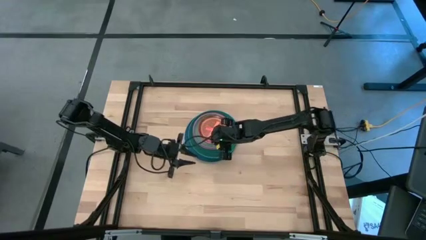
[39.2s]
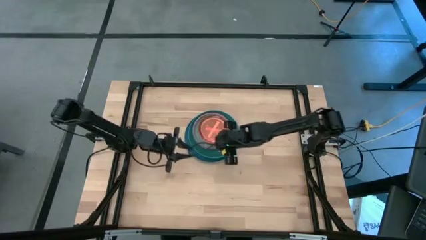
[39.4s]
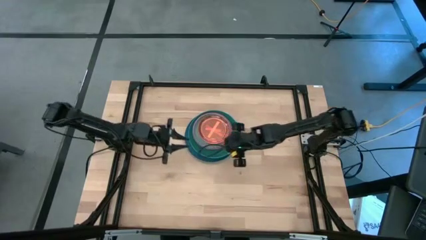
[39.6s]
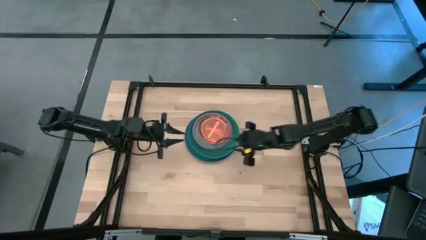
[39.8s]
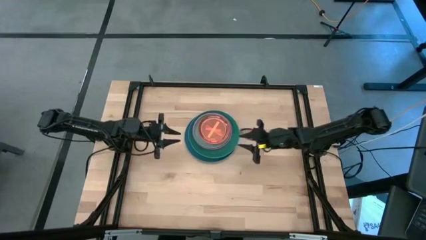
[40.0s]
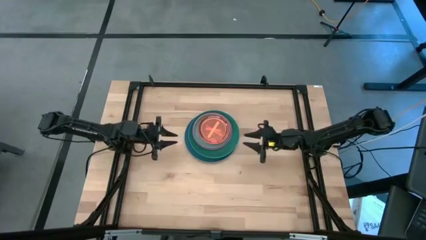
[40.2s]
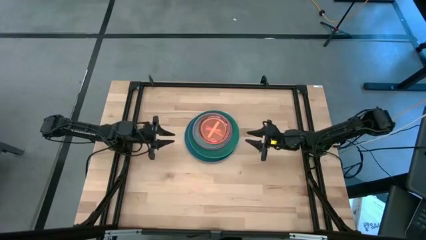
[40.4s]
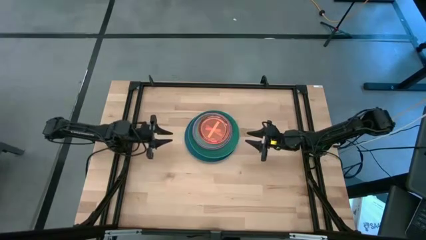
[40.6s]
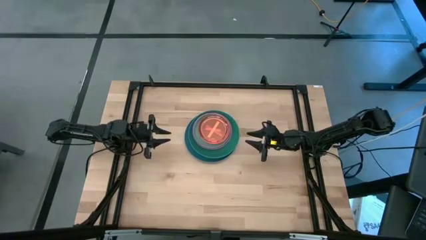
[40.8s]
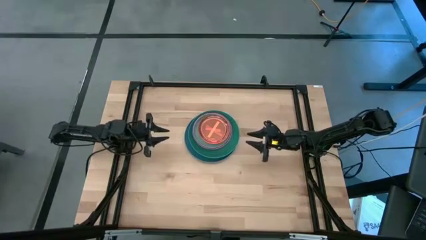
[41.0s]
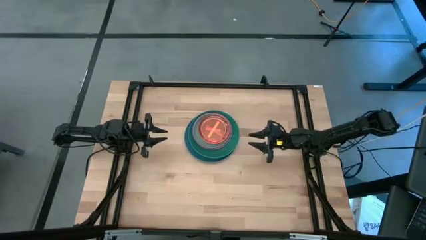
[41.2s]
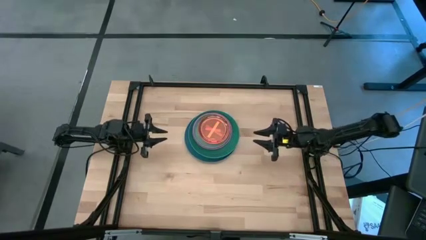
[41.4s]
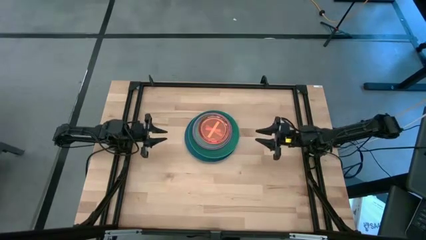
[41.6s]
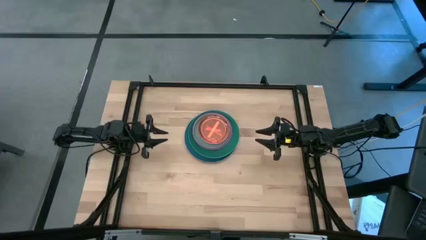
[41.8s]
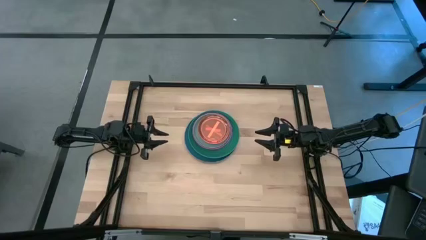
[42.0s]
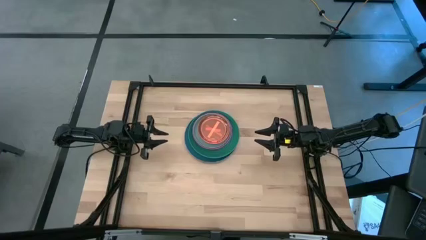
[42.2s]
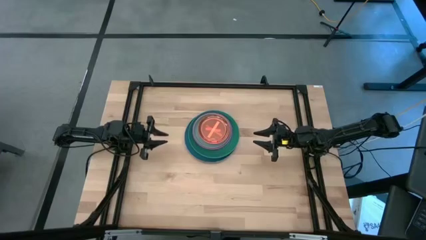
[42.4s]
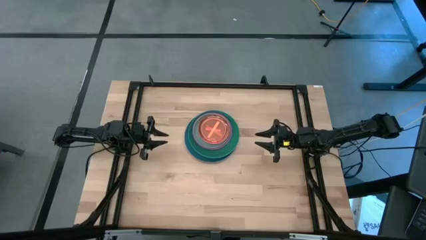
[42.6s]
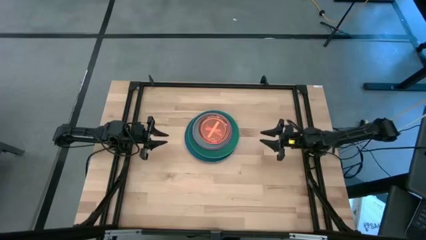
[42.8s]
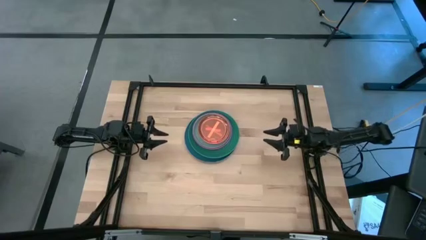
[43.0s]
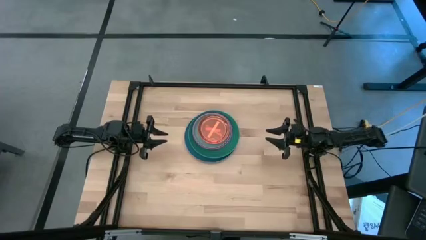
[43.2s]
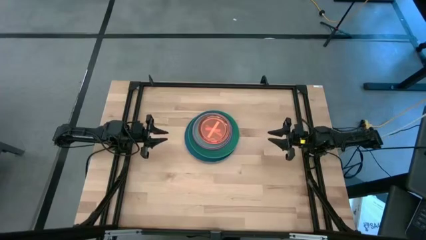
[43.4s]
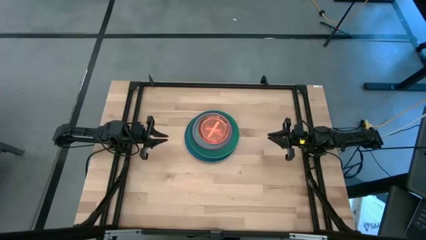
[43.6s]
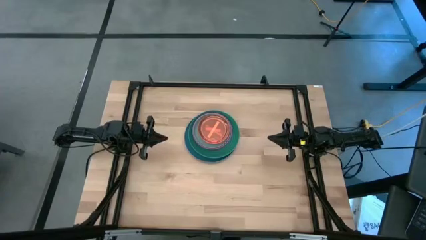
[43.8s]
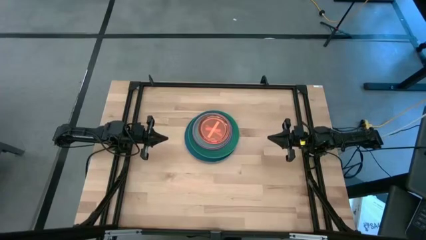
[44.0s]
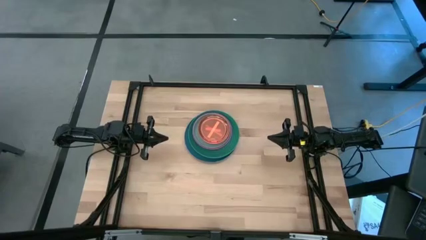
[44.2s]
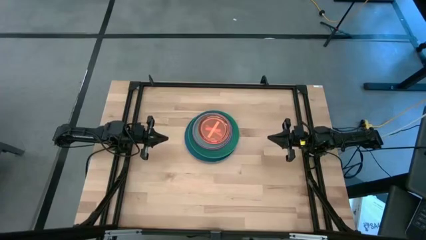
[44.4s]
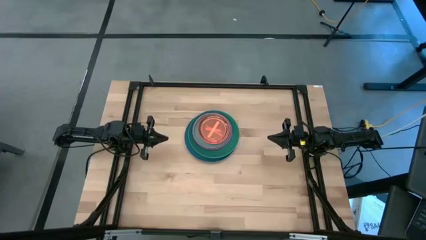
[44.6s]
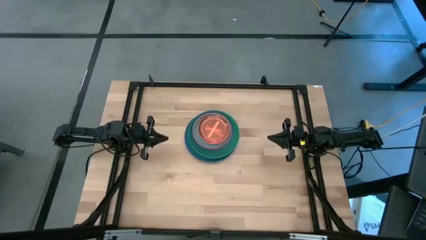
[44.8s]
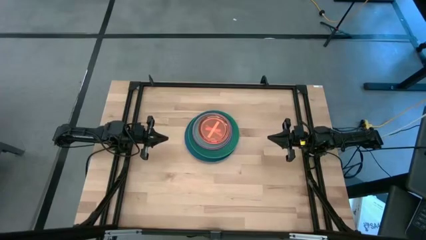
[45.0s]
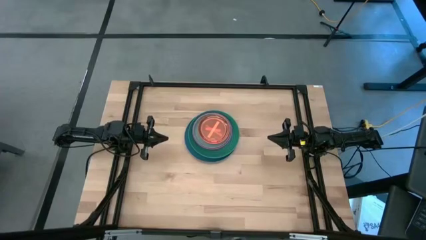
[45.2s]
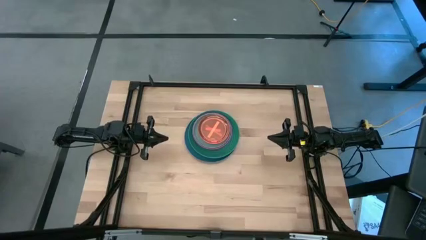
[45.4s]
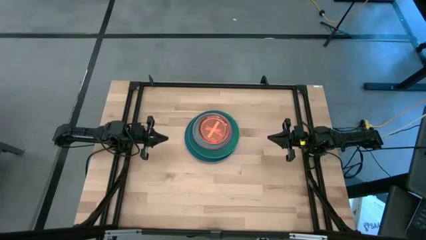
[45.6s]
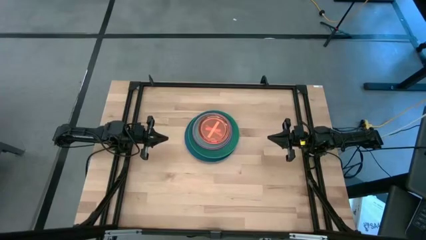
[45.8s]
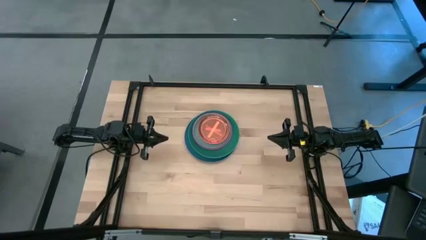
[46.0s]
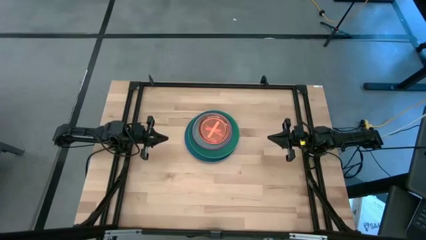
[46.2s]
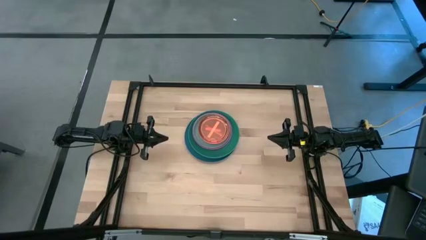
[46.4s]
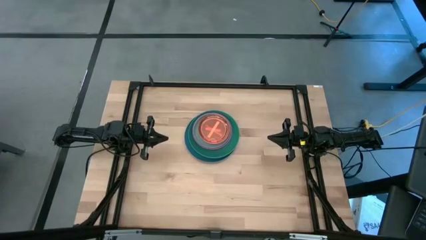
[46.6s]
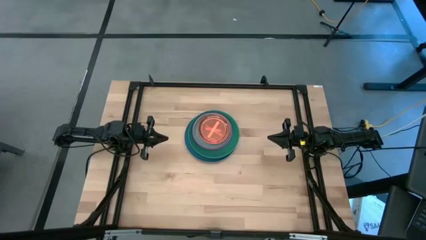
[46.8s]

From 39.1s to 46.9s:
Task: Stack plastic plates
Return to Home Position

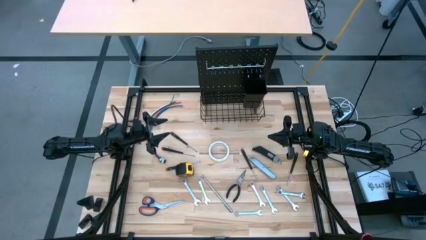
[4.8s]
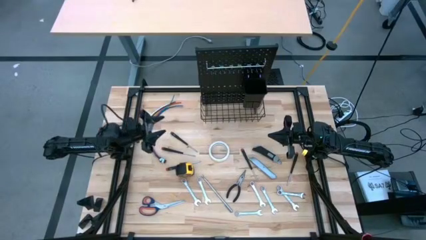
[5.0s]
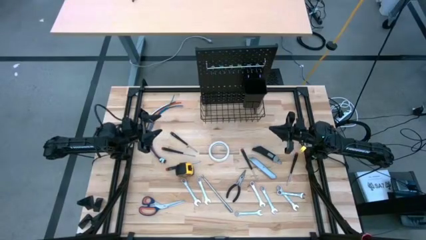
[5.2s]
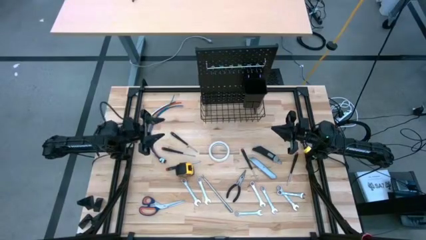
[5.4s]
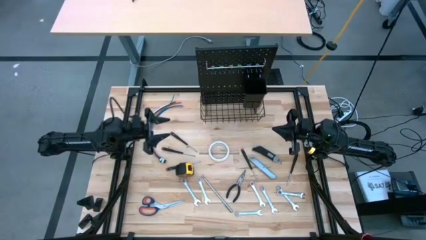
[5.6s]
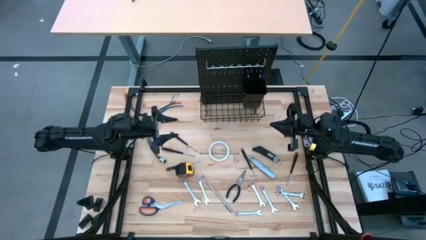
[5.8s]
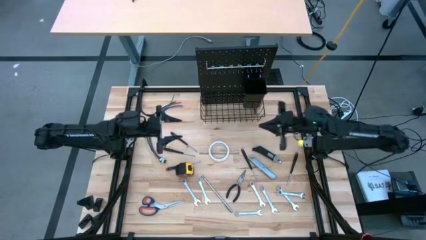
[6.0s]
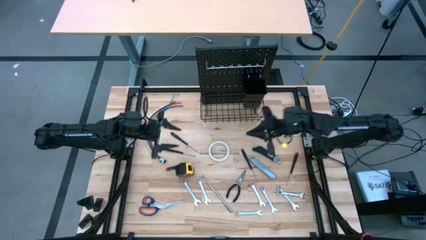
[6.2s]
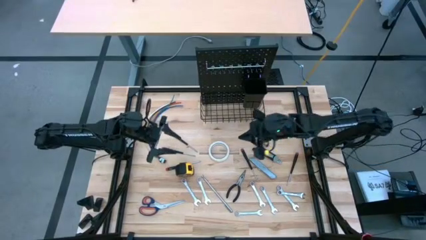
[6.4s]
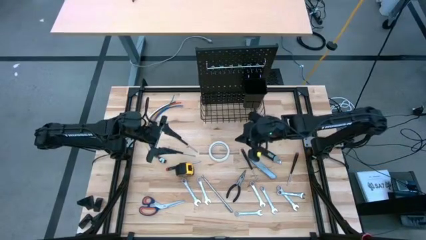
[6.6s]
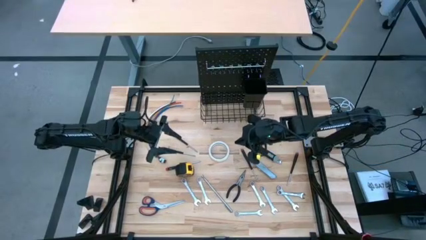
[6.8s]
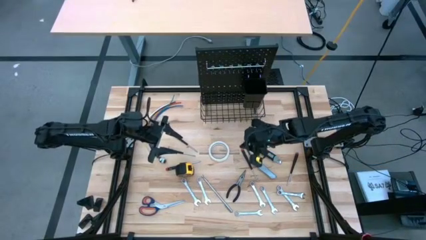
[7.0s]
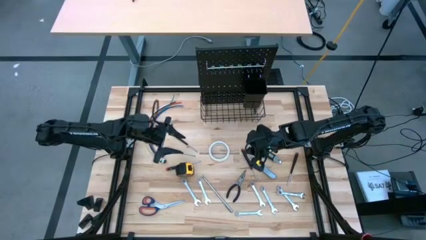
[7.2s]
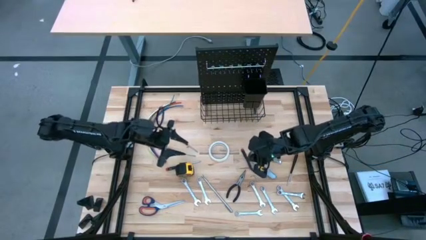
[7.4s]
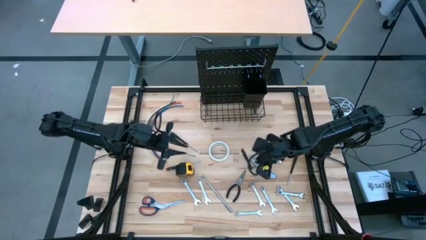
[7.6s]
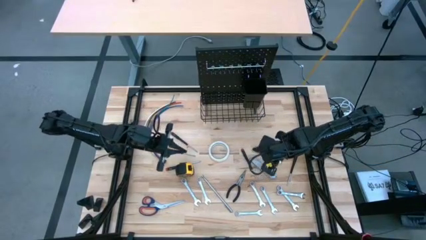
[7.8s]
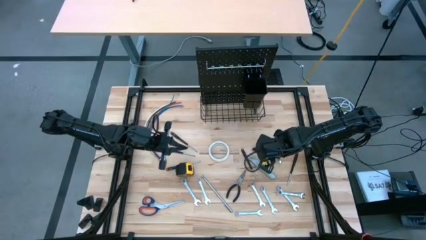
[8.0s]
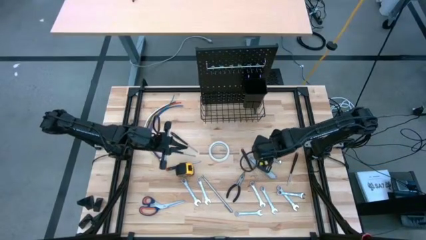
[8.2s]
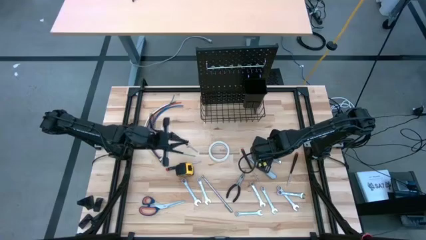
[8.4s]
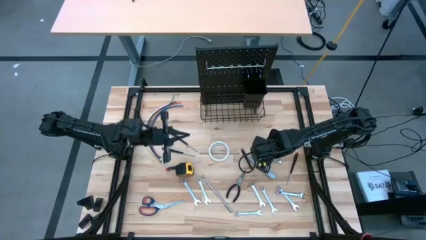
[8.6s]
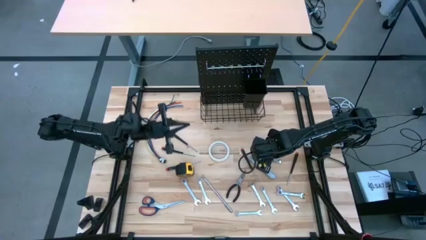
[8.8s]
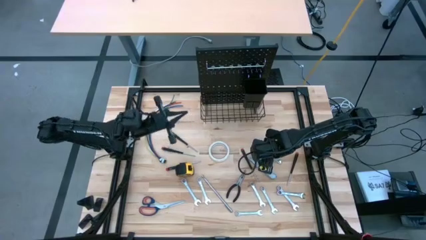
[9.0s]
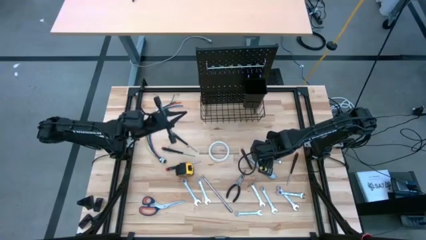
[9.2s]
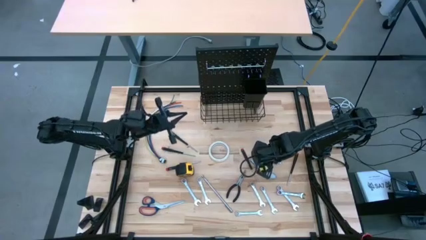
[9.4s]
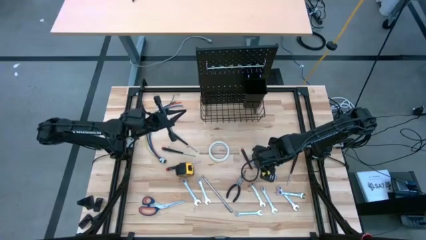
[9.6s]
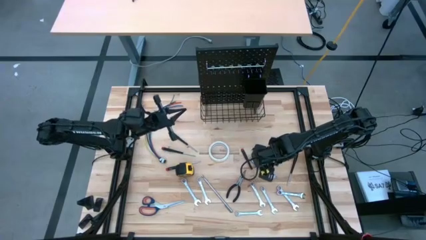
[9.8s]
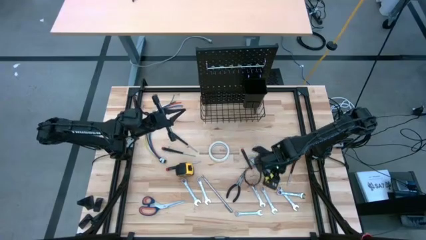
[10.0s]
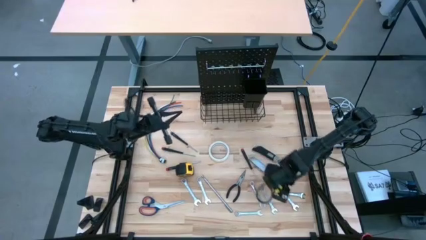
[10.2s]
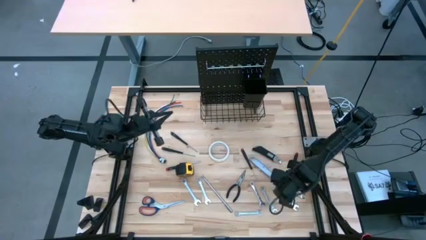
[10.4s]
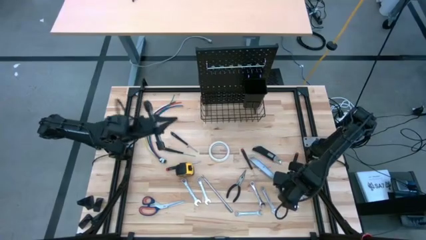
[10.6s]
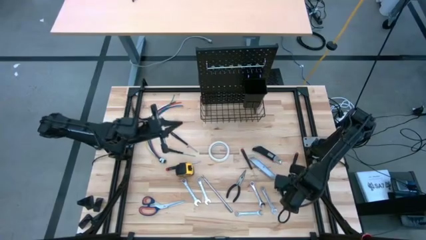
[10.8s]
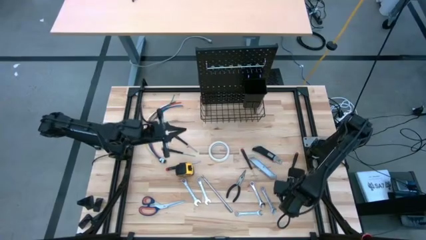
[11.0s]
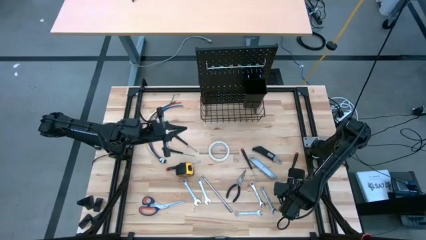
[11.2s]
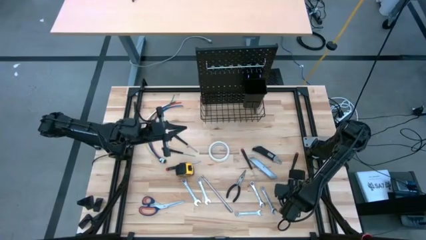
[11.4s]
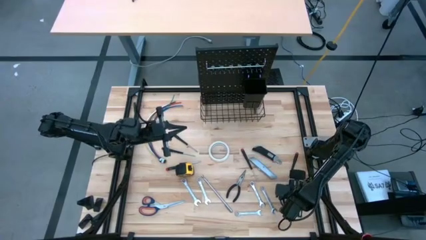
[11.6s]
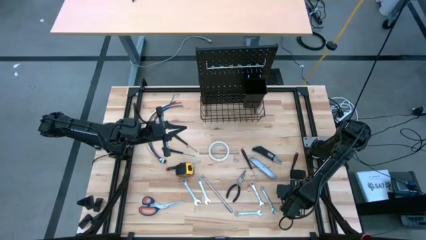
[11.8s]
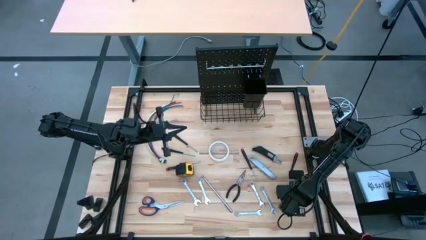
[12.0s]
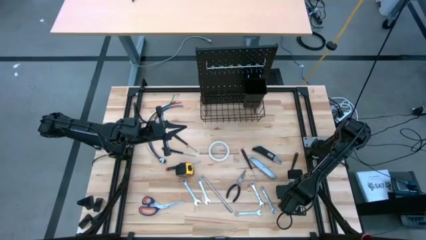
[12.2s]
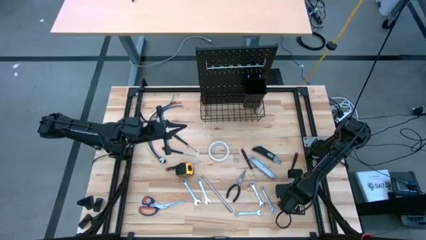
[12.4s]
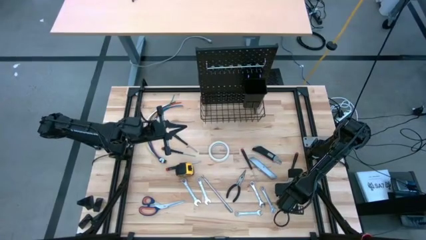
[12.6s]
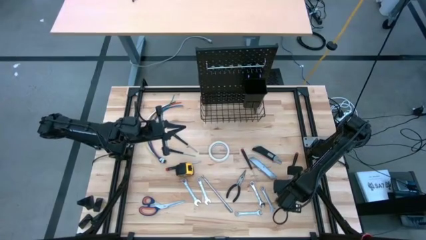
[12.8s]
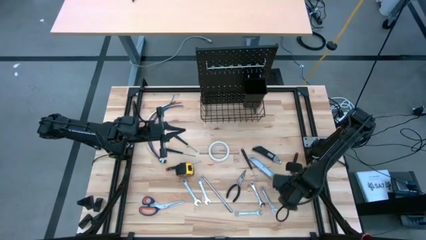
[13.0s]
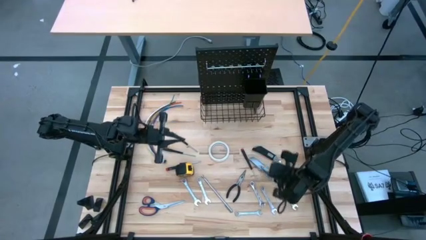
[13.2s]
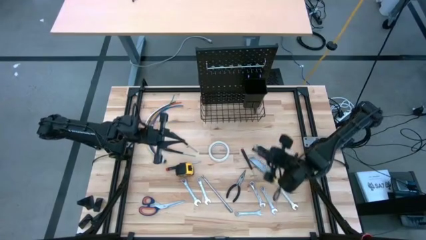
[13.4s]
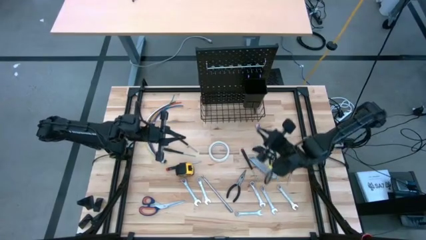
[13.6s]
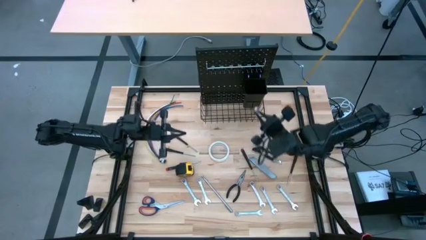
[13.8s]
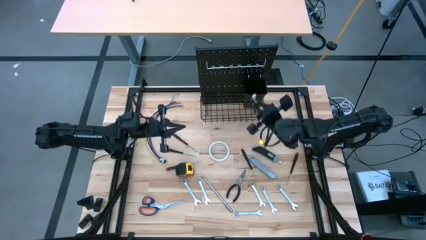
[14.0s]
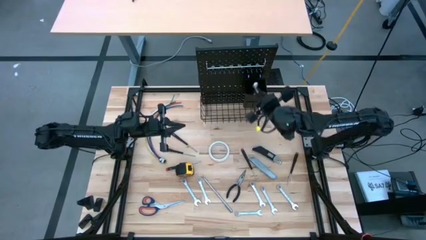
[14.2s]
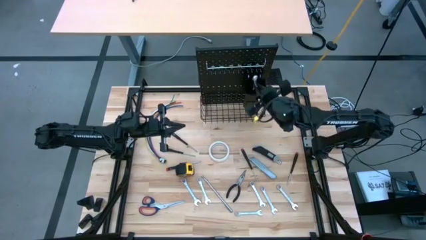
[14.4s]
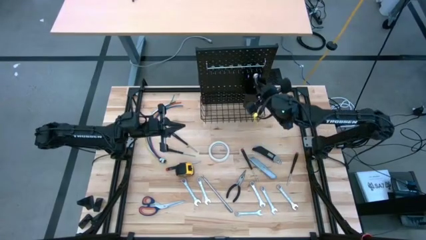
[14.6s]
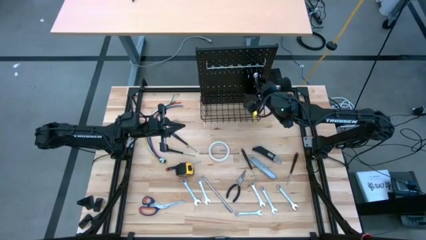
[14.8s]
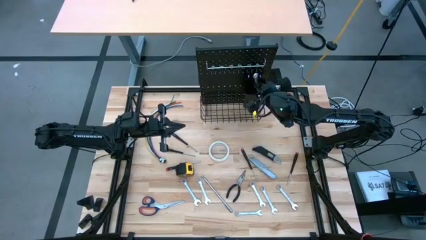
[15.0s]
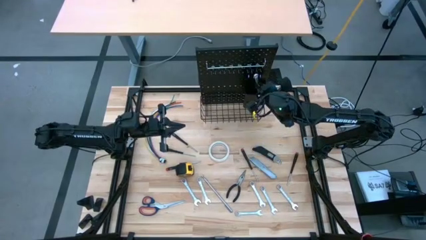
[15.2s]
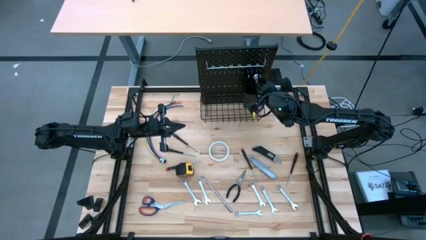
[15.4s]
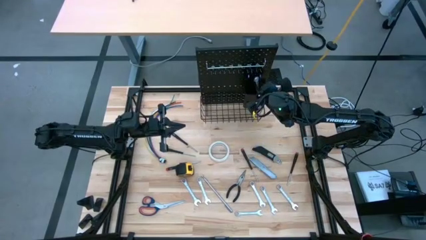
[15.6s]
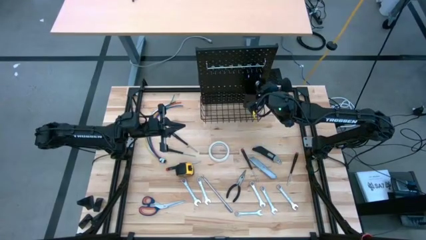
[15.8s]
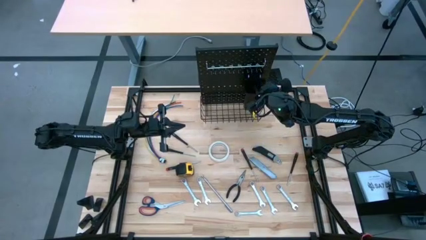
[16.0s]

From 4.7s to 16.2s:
Task: Hang tools onto peg board
Put the wrench into the black bin on the peg board
